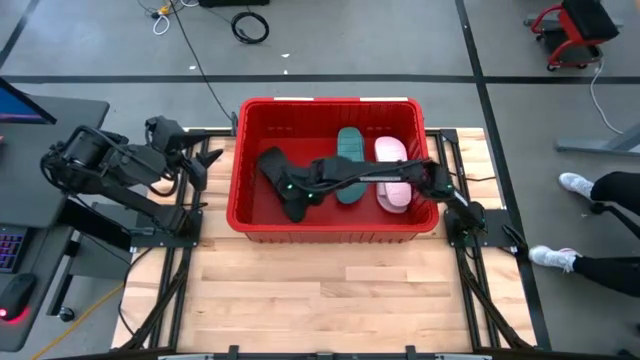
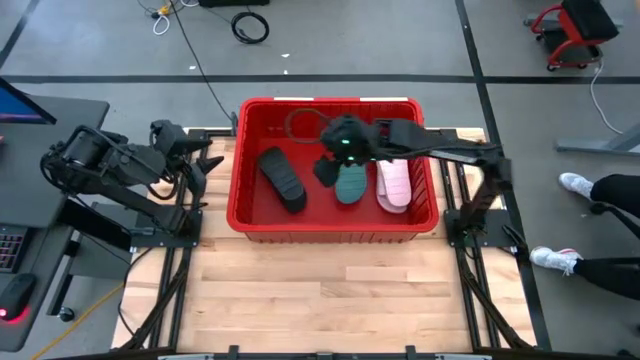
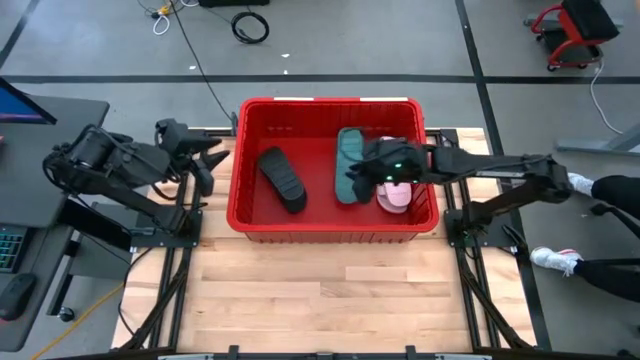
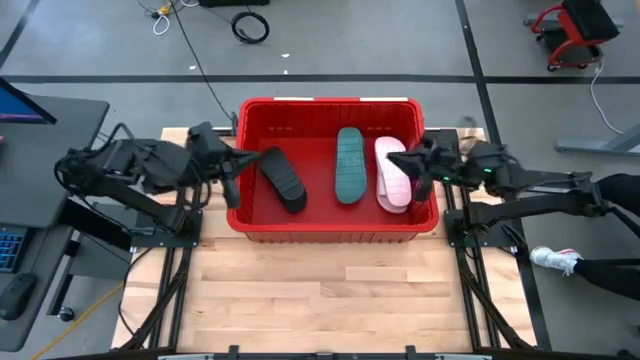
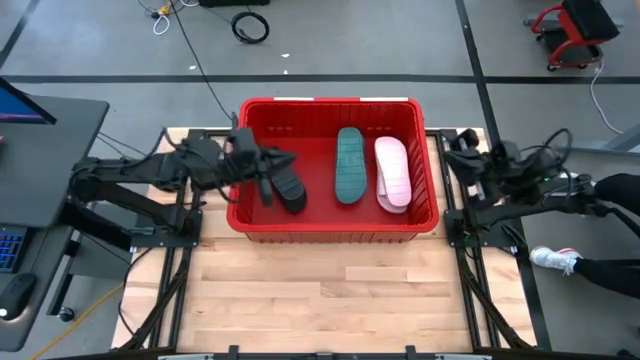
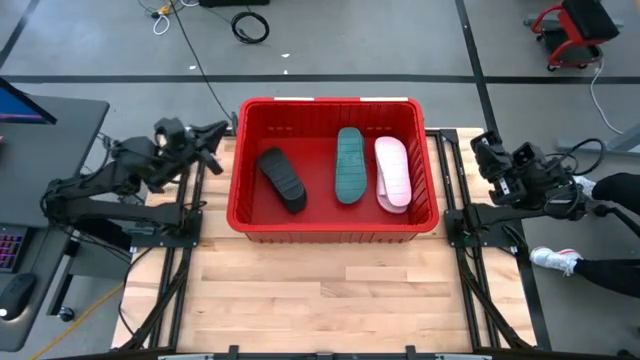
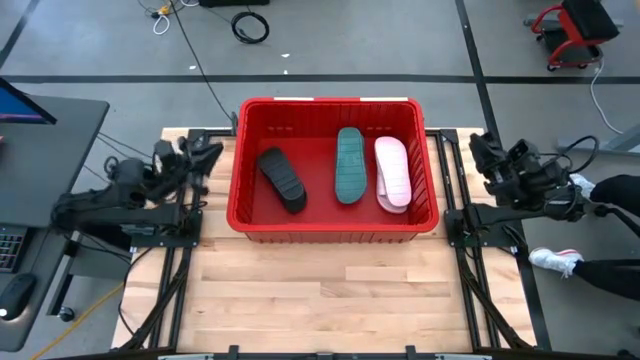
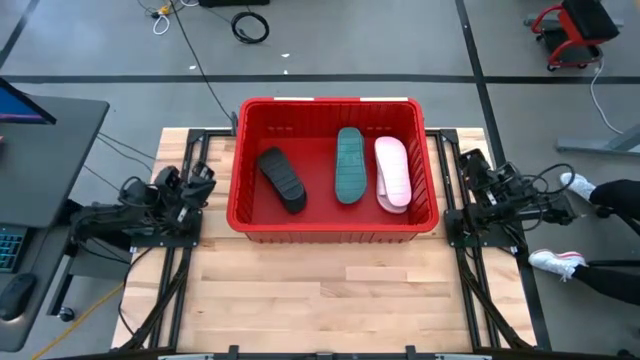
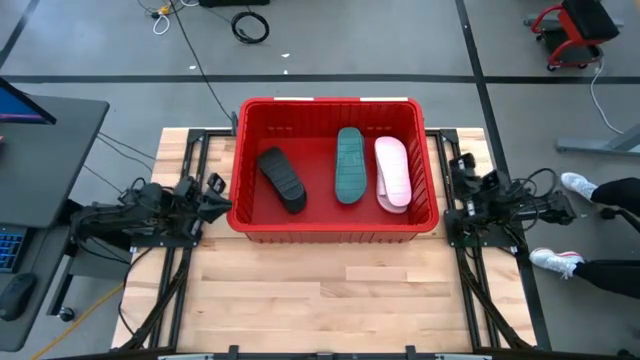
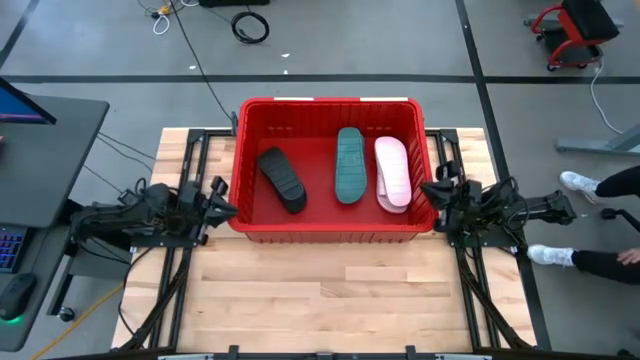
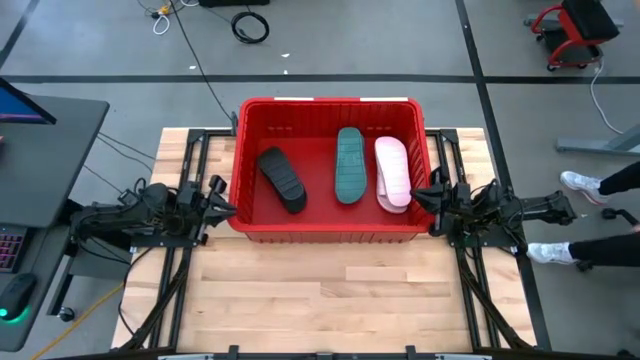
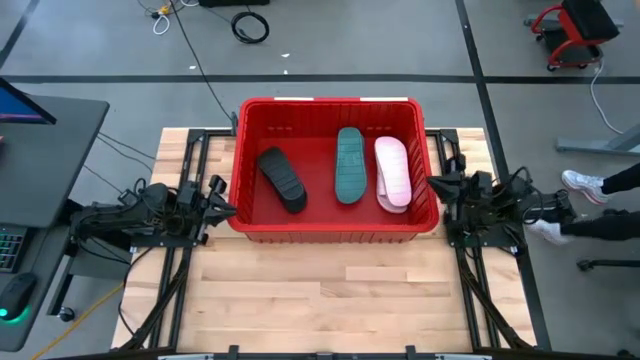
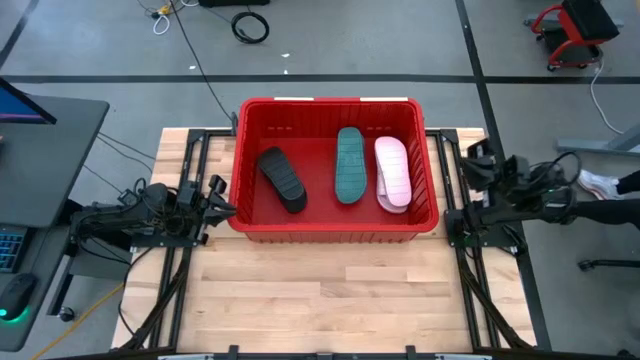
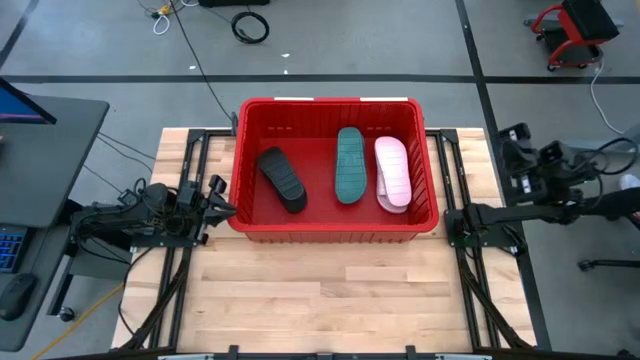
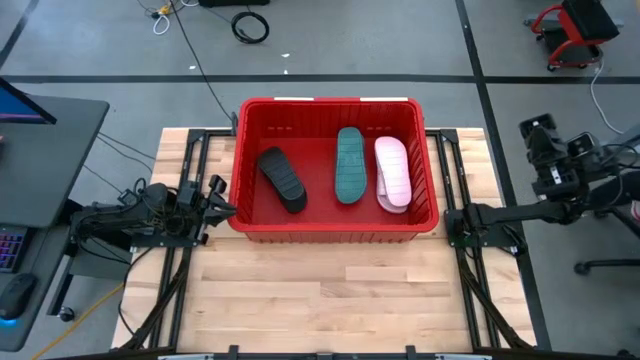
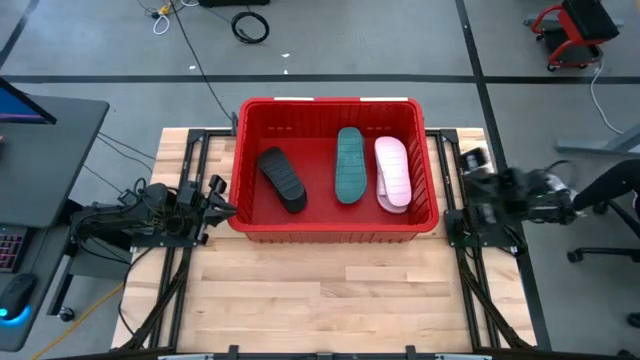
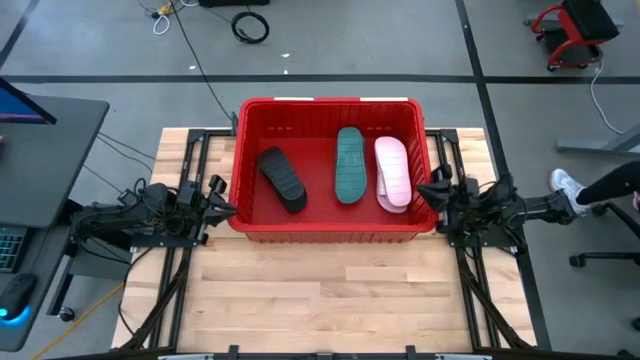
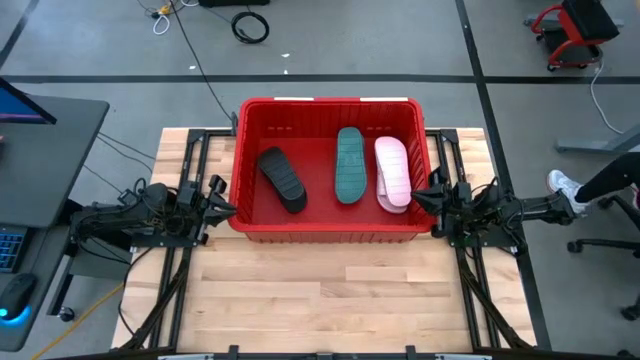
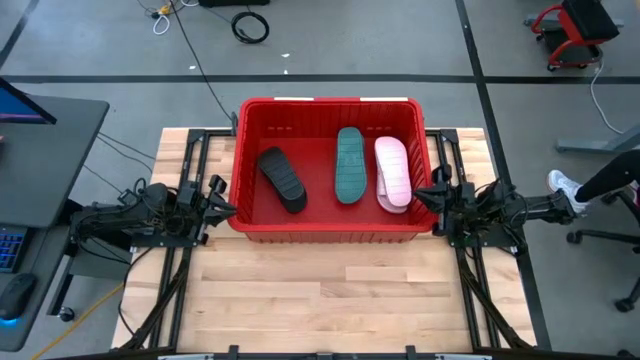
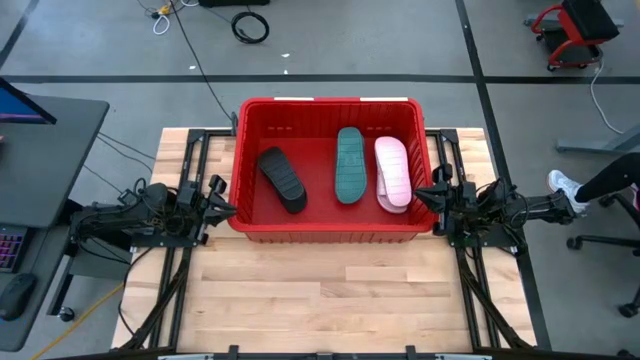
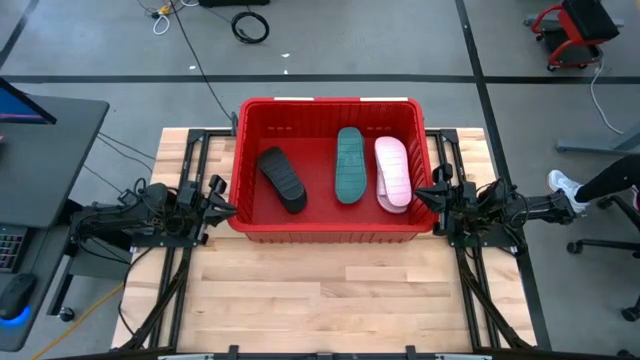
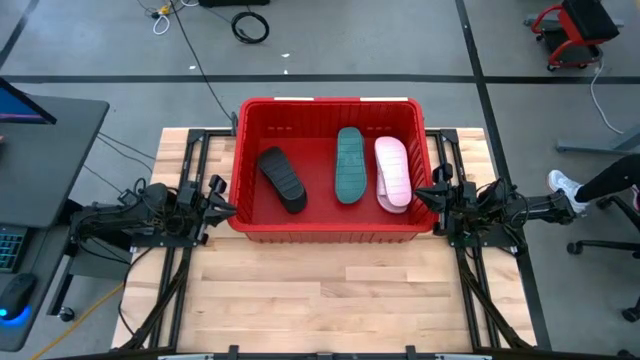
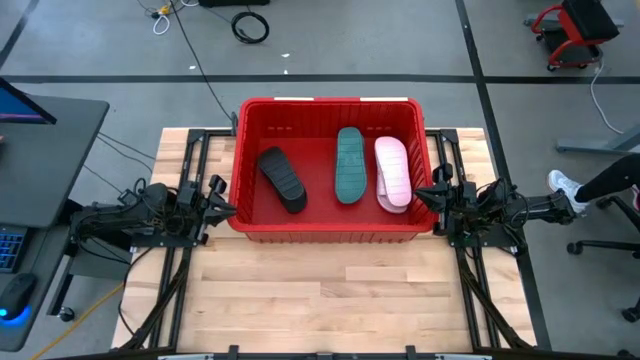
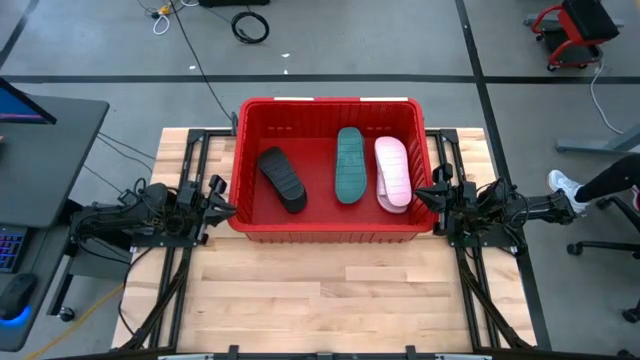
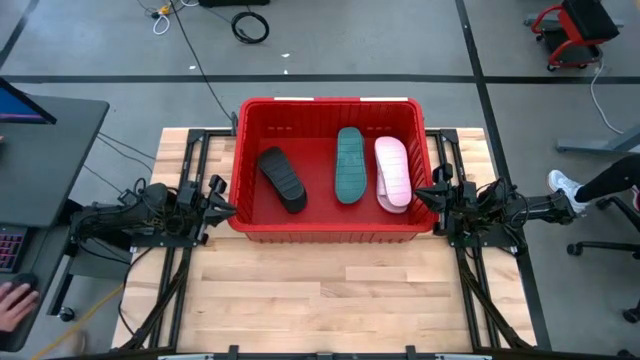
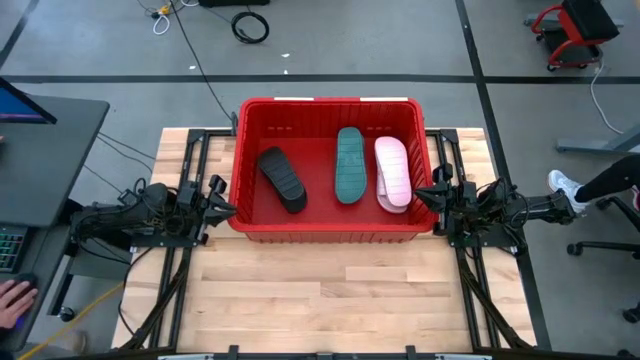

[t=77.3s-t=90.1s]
Task: Pick and place slides into bin
Return to Home Position

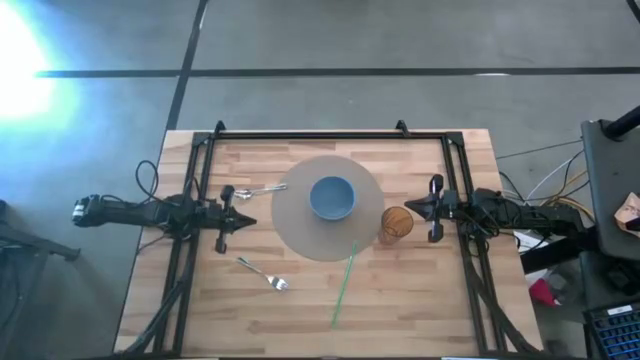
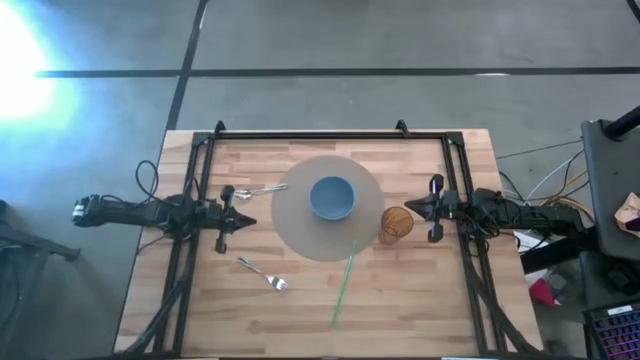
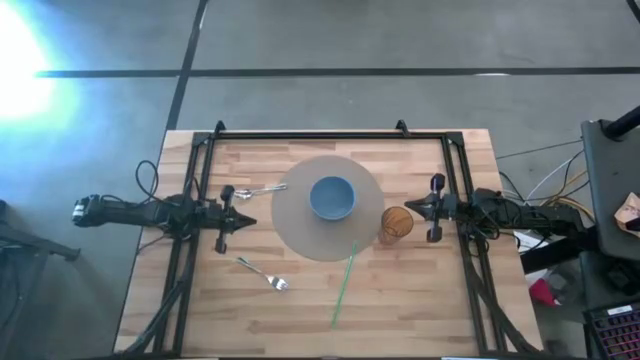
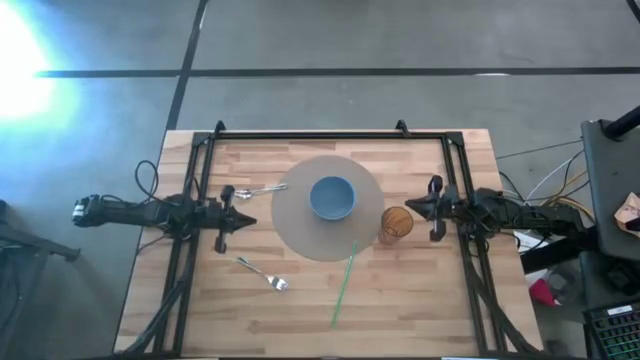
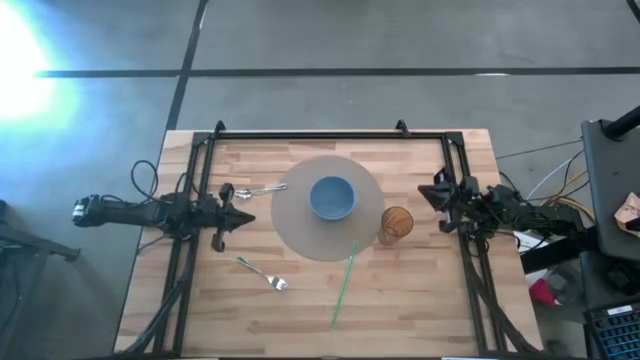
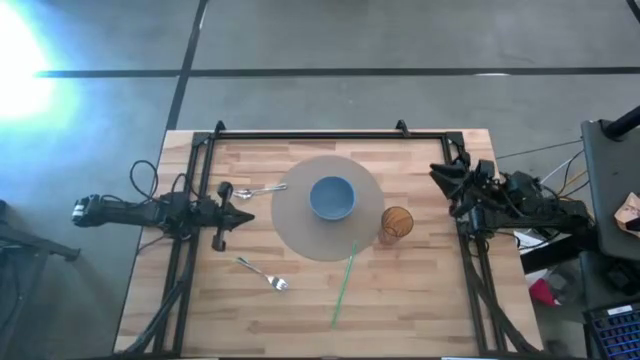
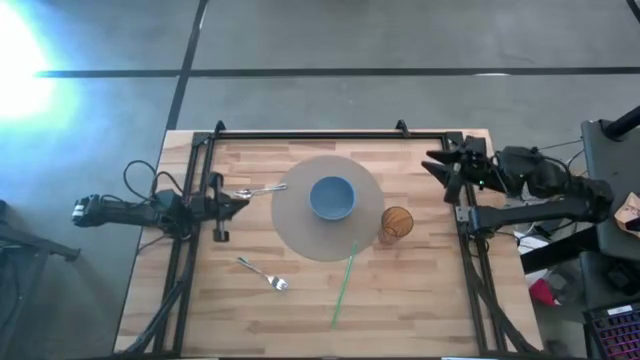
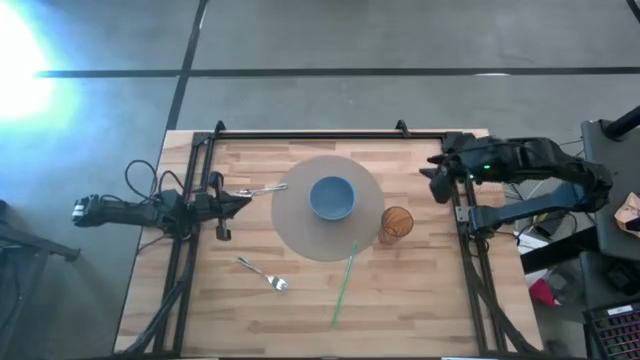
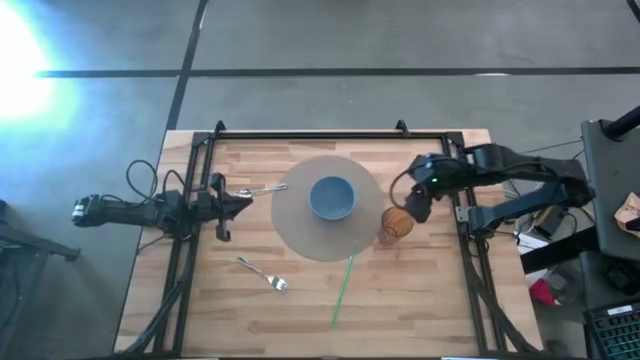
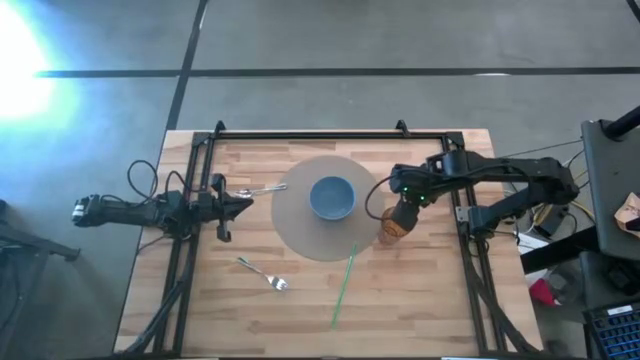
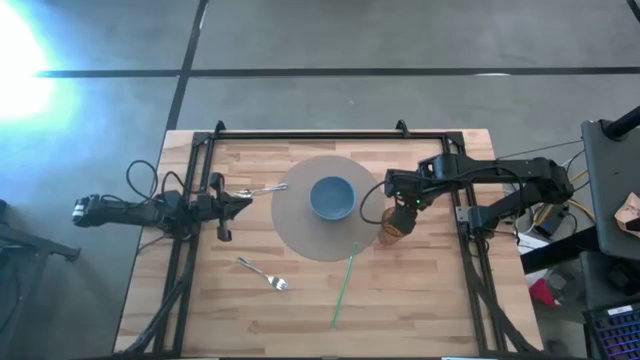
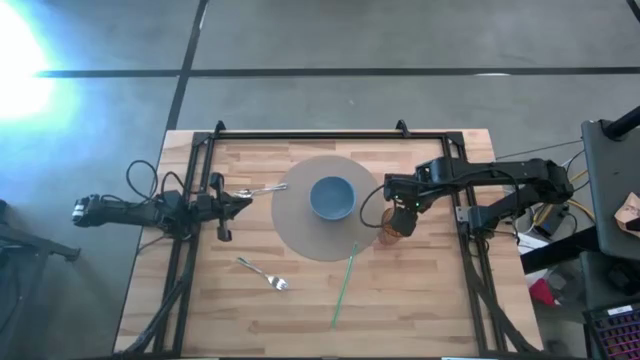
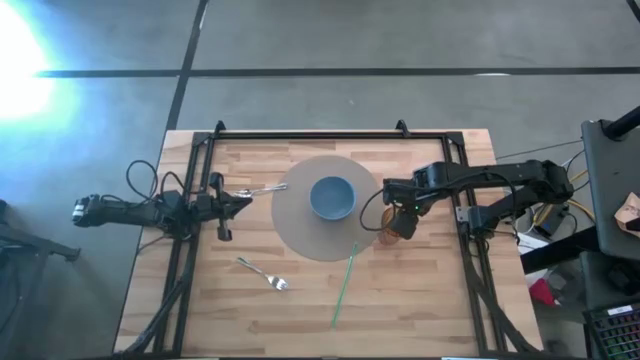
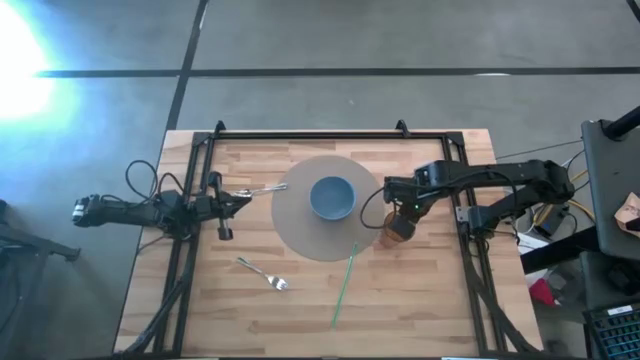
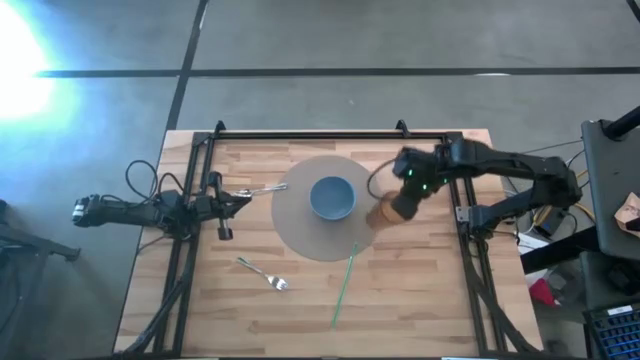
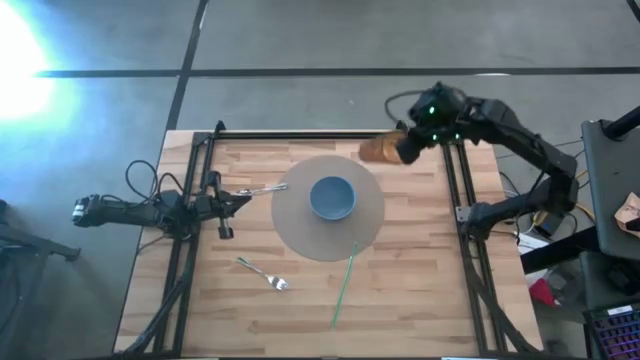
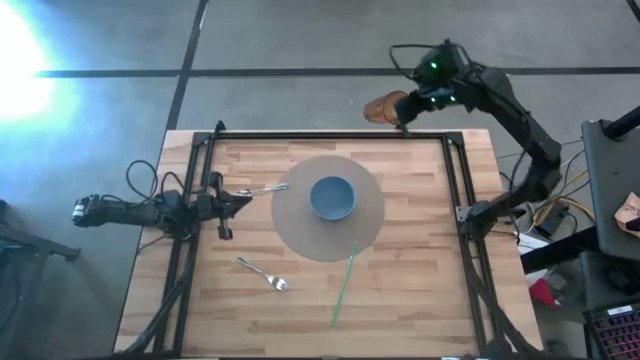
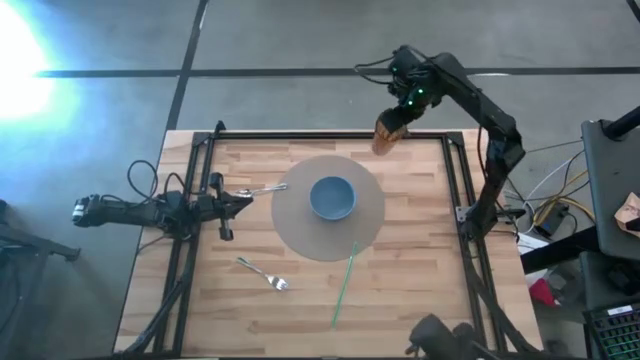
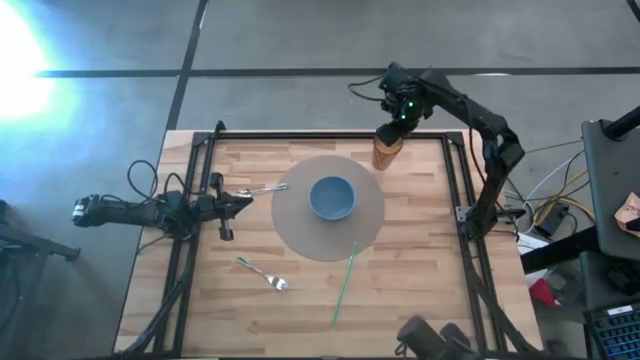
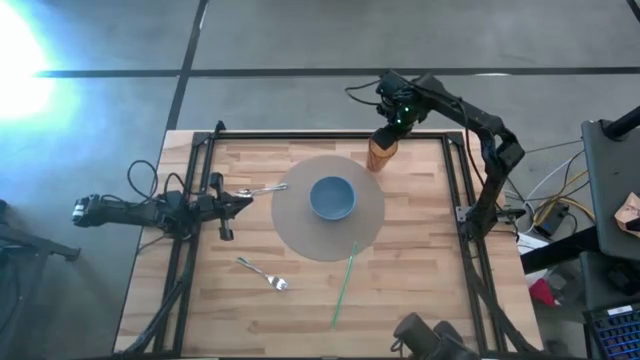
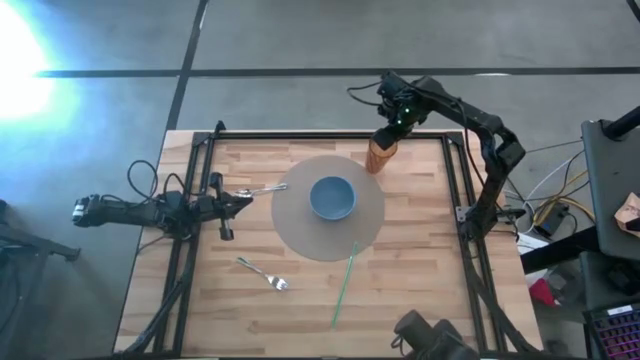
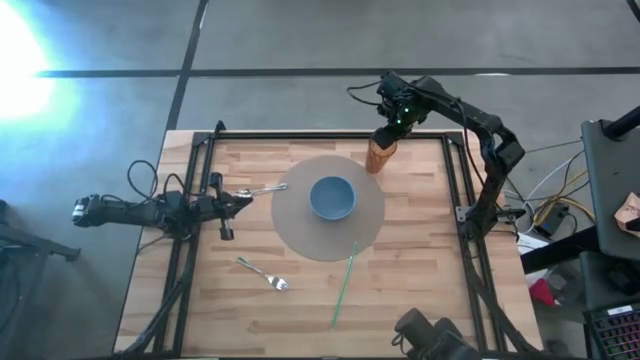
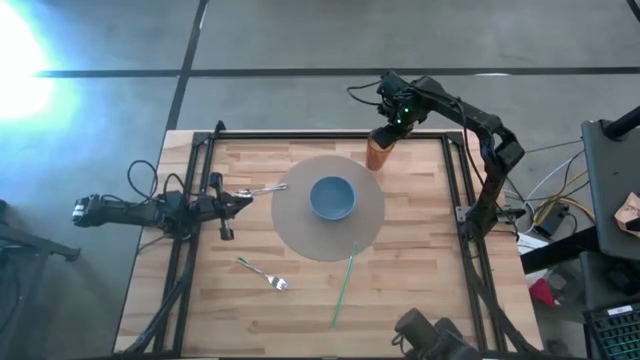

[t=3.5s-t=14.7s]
Task: Pick & Place Utensil
Put the cup on the top right of the placemat
